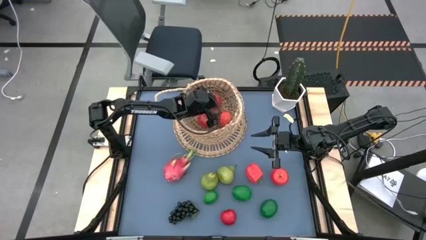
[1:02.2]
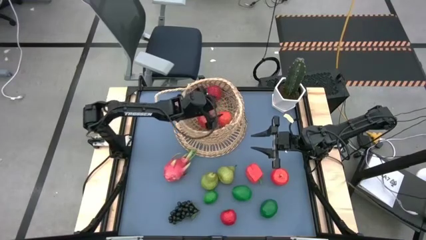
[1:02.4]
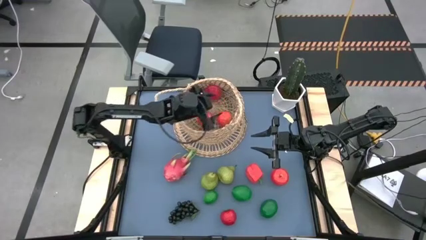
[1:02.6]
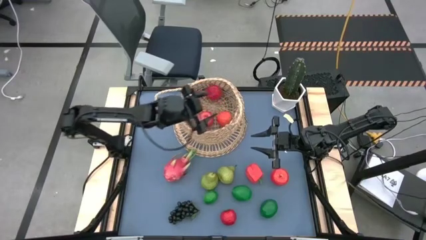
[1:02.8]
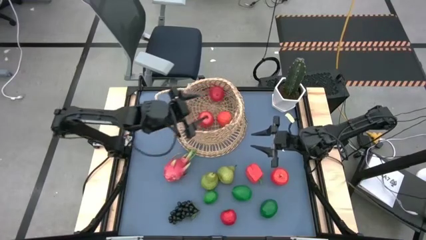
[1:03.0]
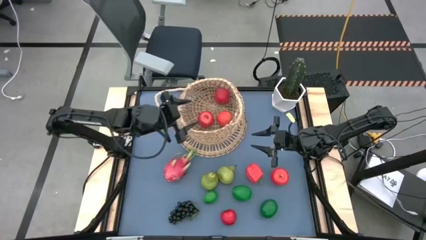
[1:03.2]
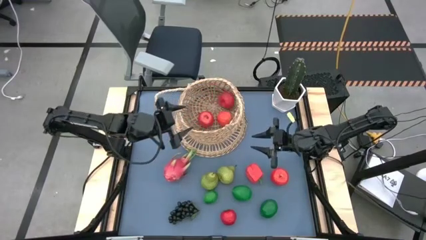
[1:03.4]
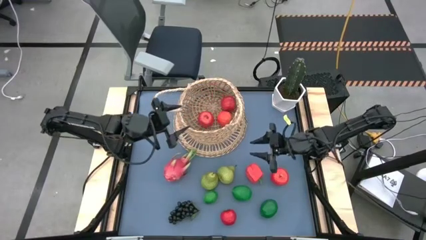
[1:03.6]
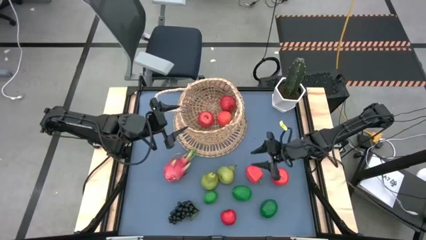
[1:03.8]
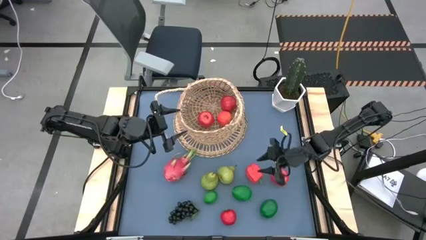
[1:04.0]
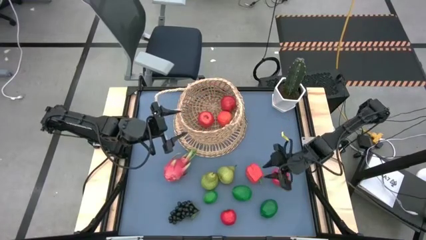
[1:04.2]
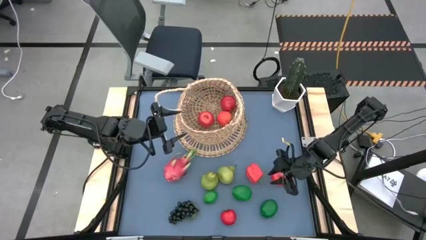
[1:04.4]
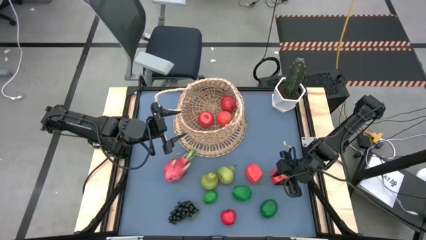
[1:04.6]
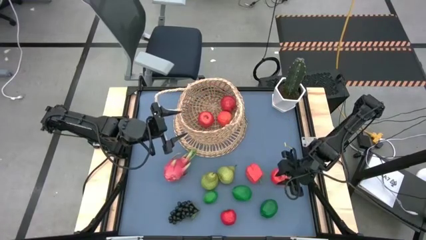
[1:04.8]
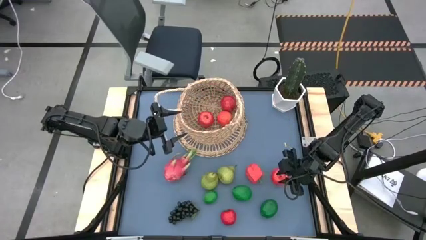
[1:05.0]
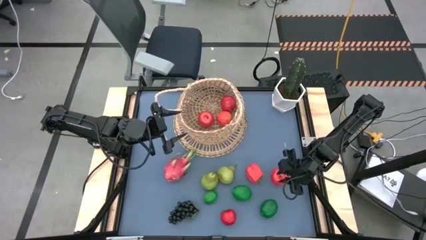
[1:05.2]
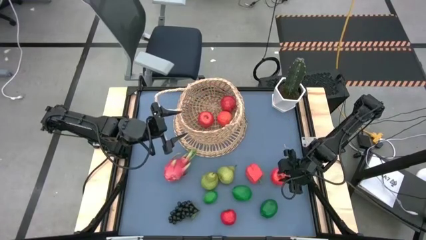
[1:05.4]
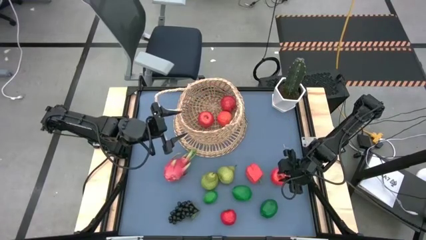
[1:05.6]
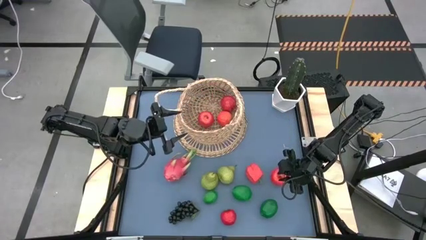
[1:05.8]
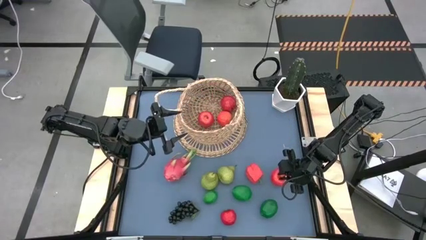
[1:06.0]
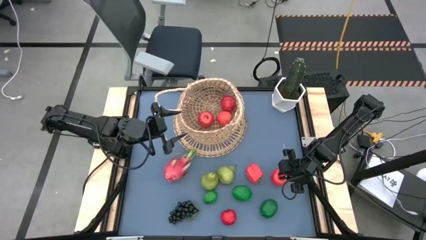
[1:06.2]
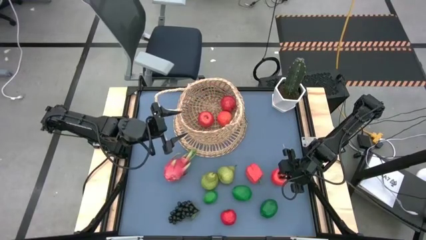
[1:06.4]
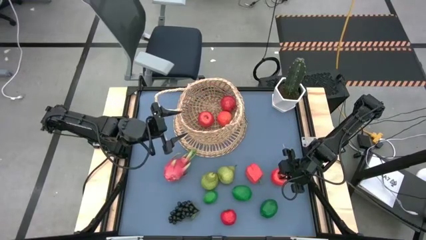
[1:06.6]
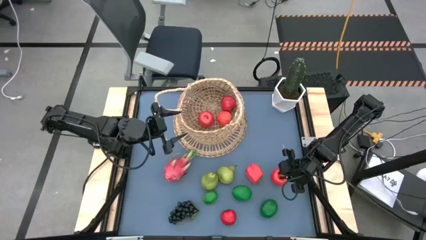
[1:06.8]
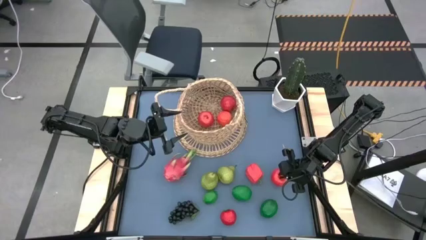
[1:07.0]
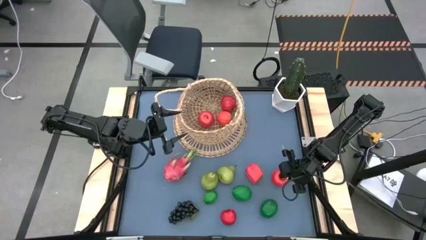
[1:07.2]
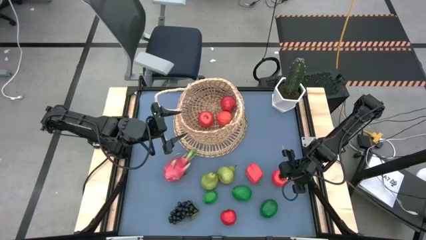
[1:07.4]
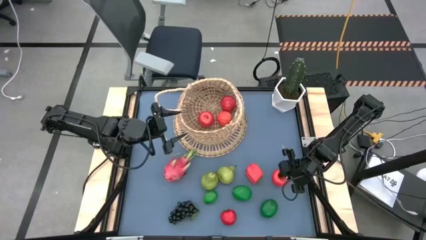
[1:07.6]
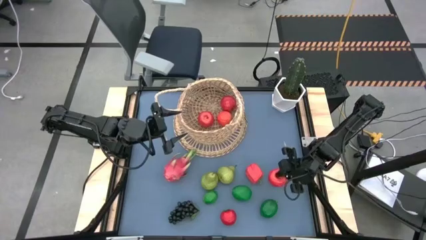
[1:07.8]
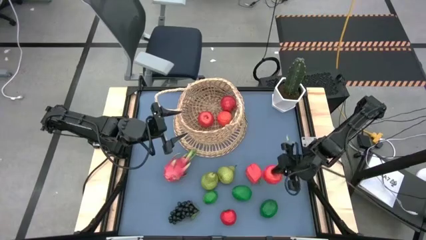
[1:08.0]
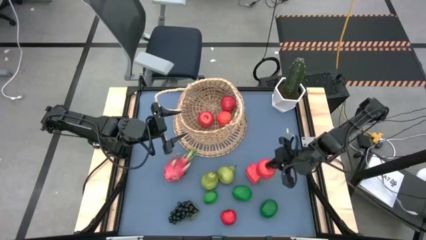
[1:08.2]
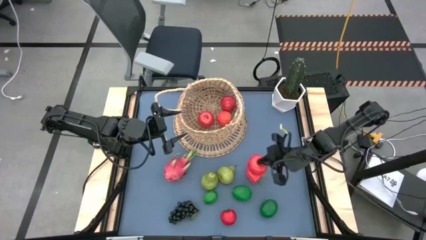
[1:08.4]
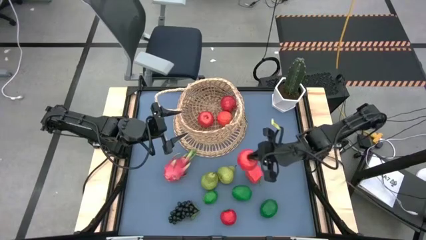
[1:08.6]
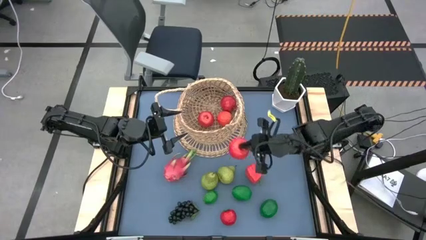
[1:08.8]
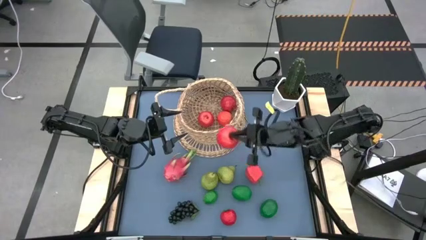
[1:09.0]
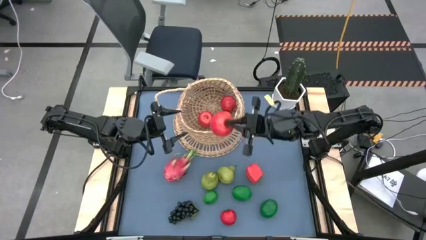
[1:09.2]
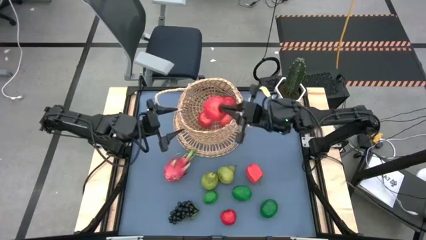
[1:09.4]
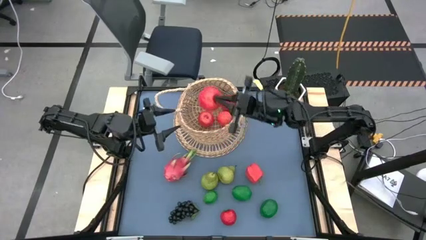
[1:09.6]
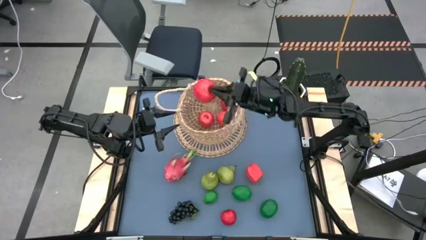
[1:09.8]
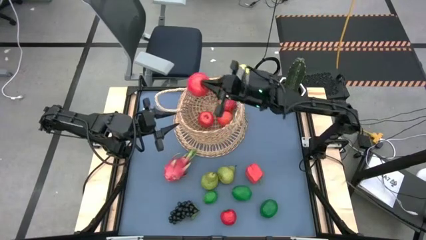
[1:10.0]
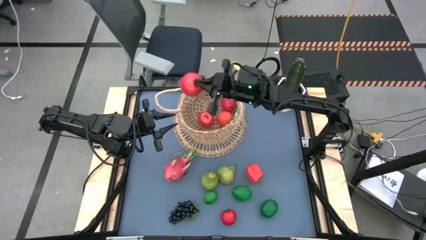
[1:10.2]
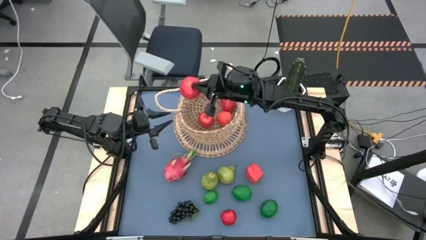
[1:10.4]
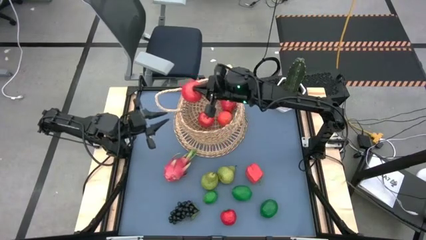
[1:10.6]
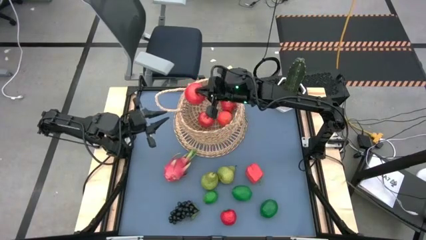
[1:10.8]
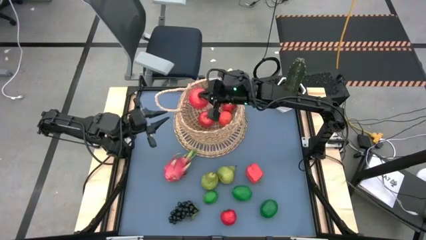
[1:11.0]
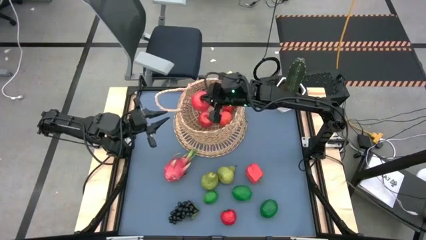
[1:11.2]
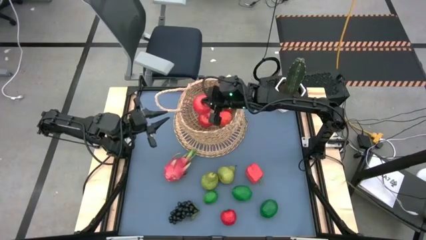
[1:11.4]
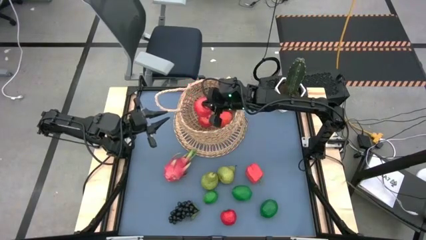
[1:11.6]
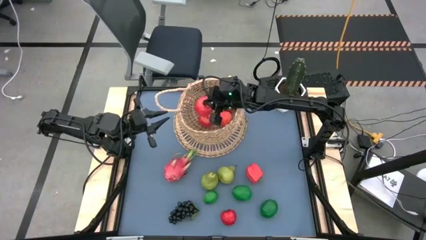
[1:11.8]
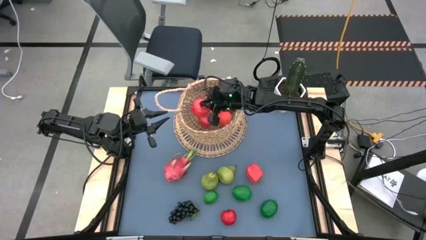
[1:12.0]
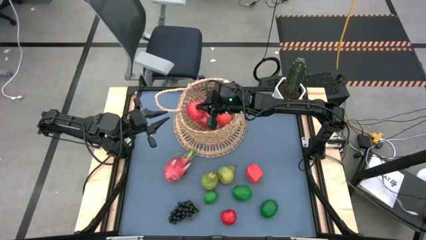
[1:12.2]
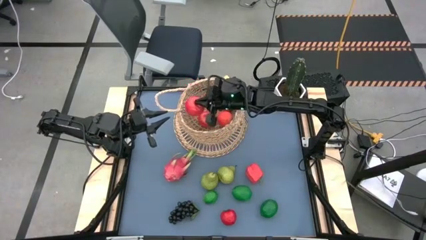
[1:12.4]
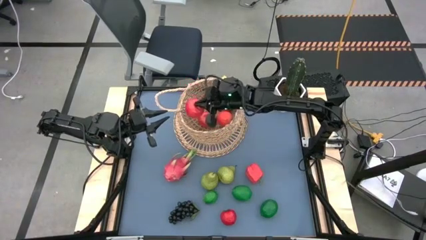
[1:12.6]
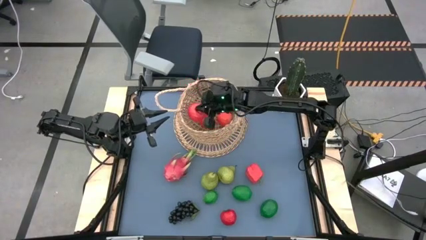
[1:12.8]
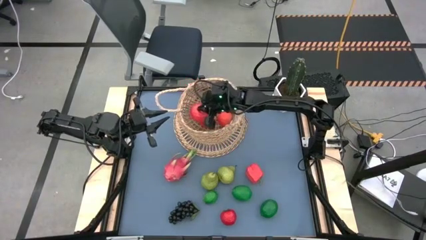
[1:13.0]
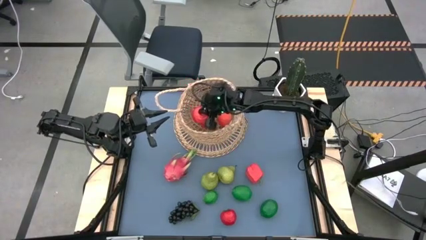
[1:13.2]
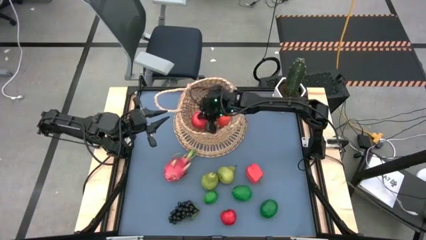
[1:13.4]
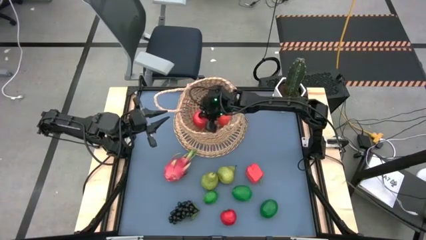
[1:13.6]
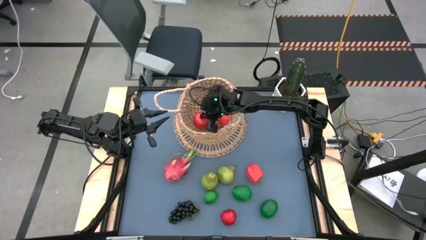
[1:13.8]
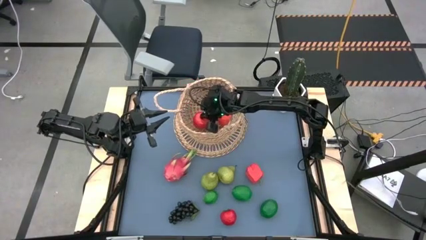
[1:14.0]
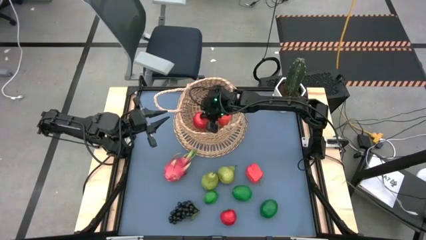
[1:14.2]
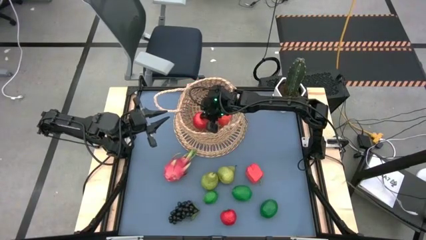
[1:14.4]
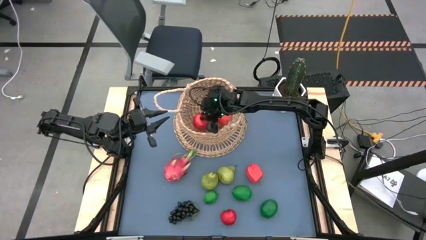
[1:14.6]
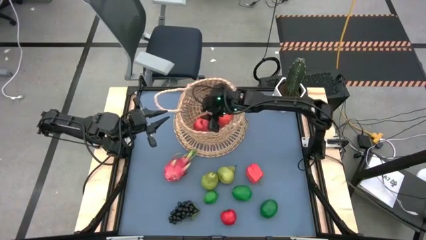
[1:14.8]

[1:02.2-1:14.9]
Task: Build produce basket
Put the apple into the basket
